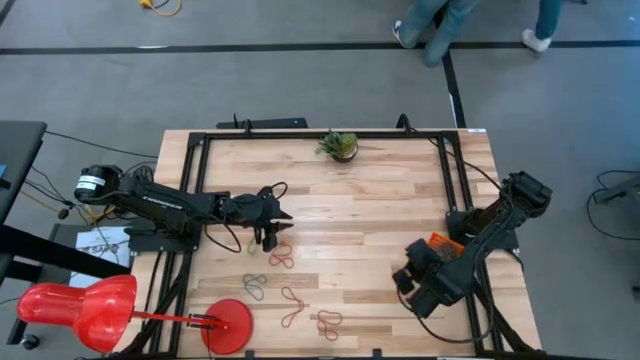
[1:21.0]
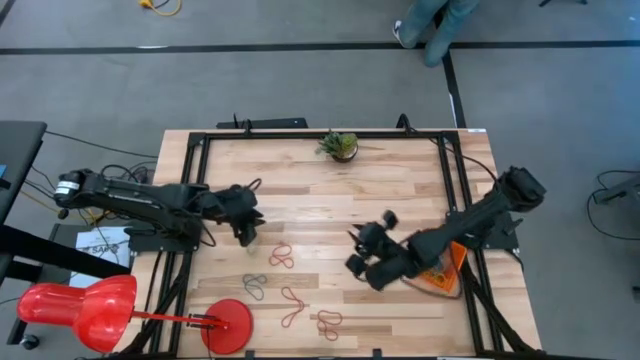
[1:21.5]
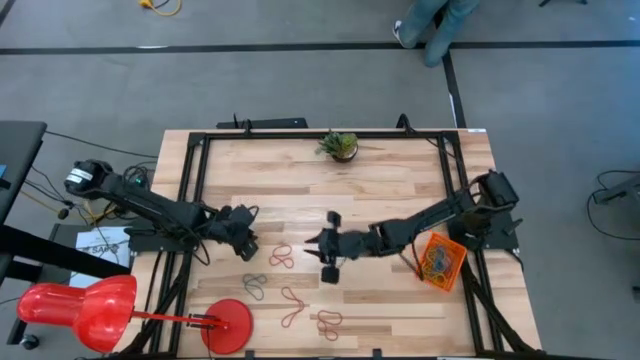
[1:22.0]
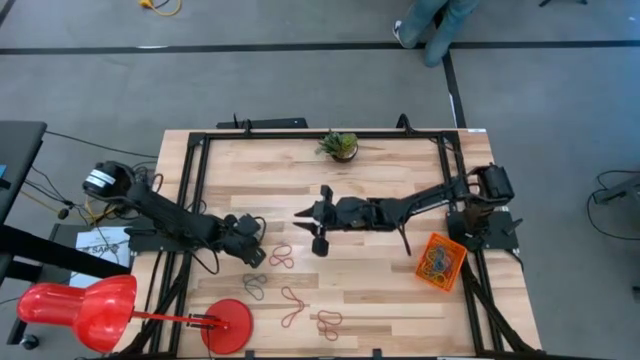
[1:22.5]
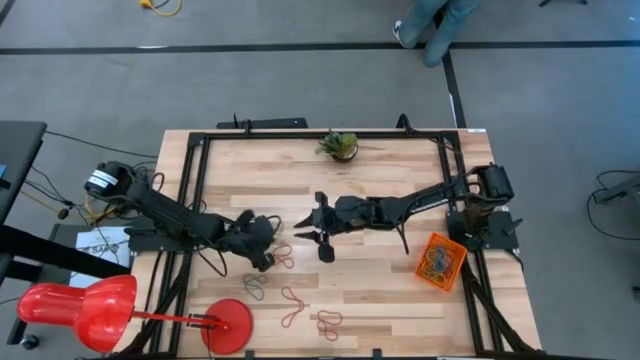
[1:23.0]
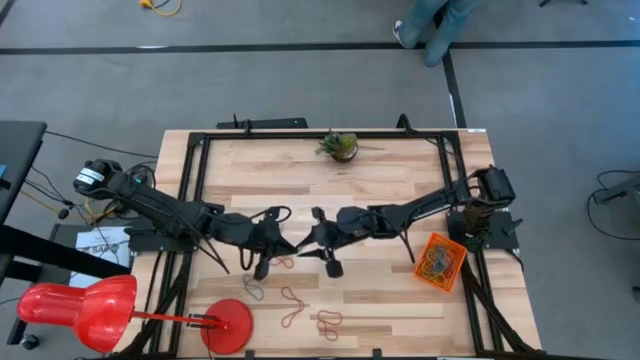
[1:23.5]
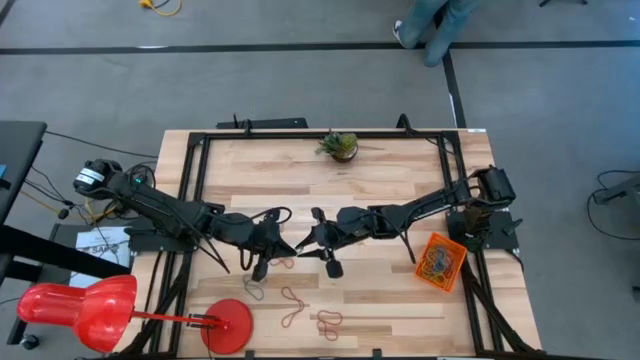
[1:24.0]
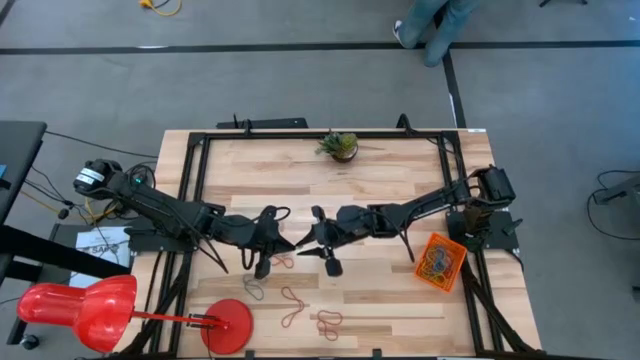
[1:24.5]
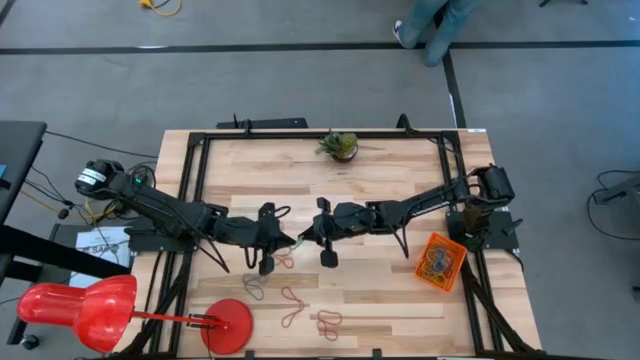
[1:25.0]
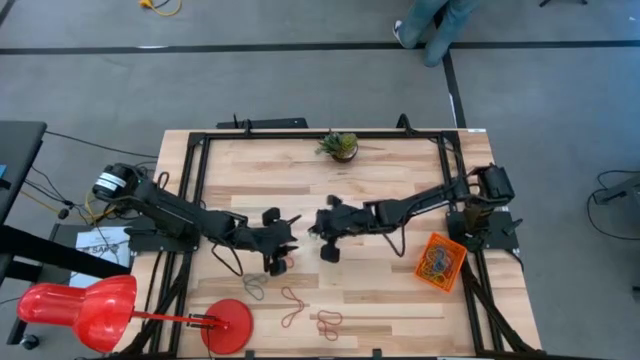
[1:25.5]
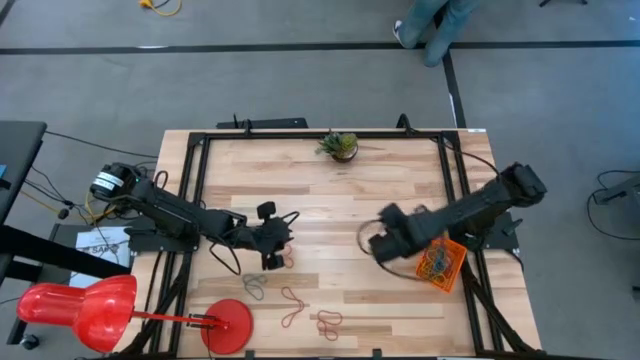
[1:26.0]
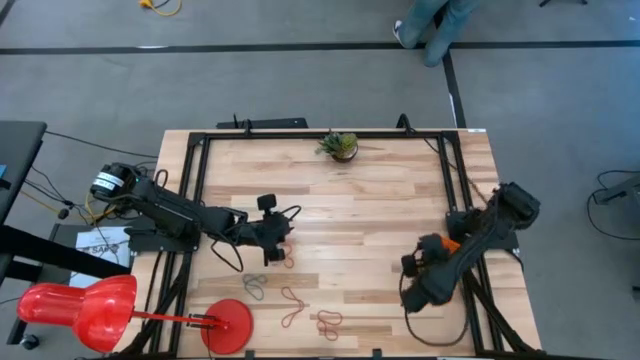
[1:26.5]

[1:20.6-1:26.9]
Task: Pick and place rubber bands into bin
Put the green rubber band into the orange basket

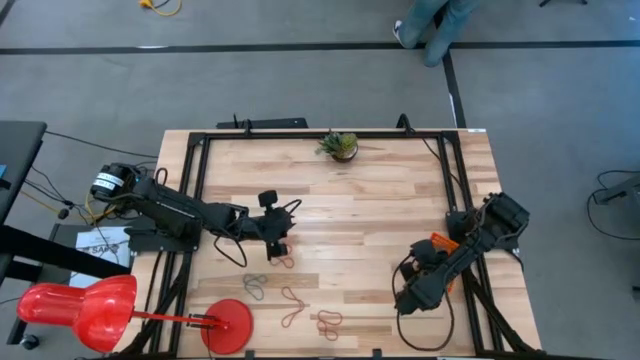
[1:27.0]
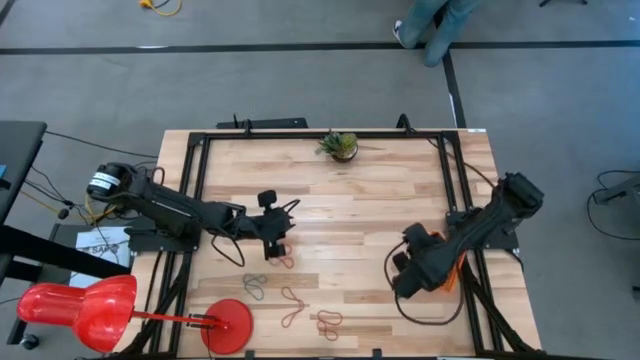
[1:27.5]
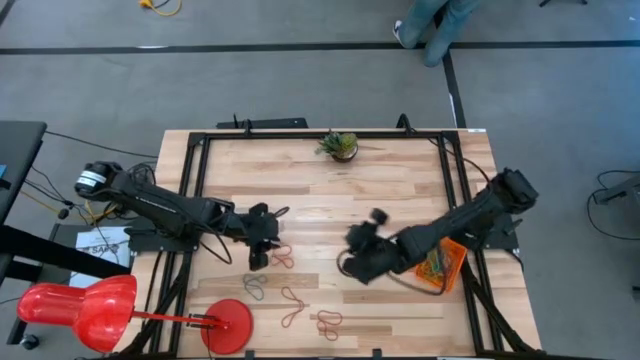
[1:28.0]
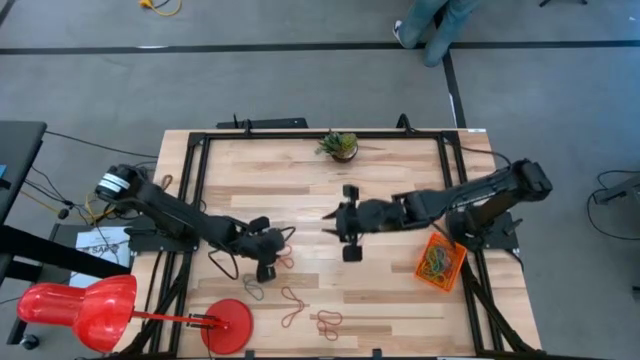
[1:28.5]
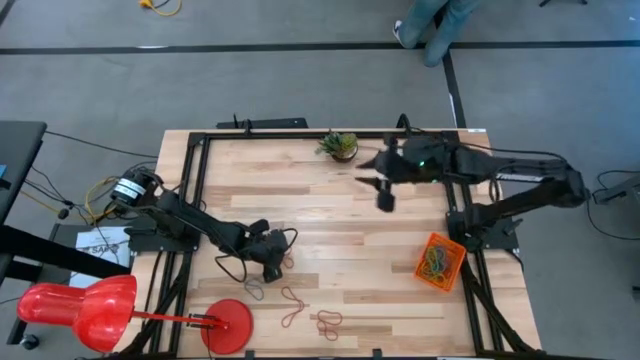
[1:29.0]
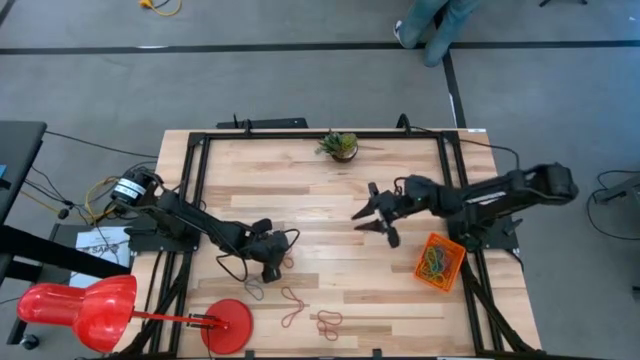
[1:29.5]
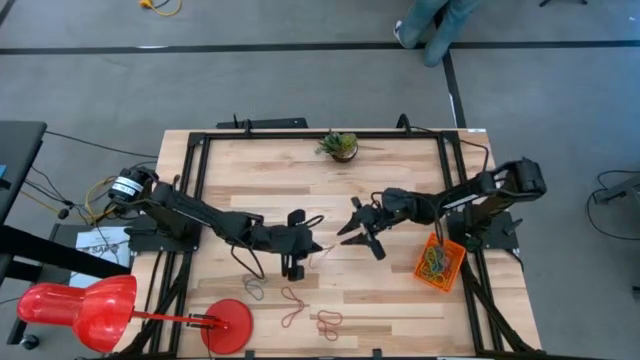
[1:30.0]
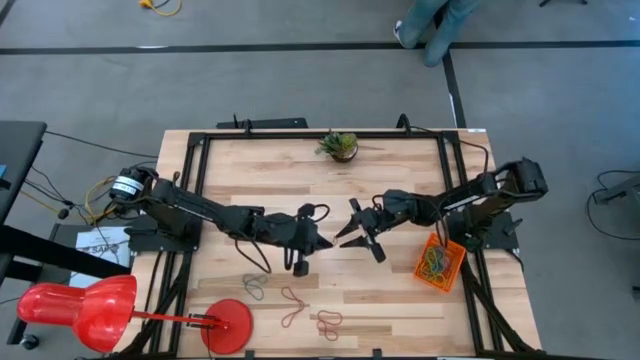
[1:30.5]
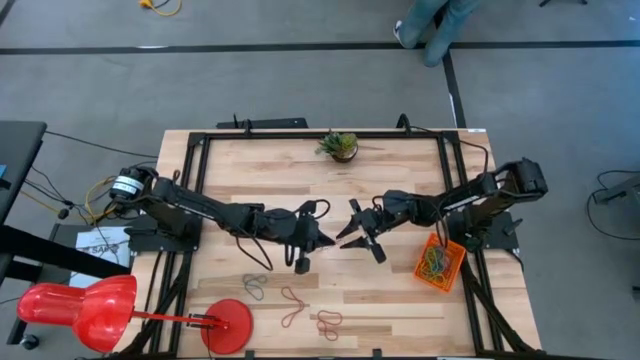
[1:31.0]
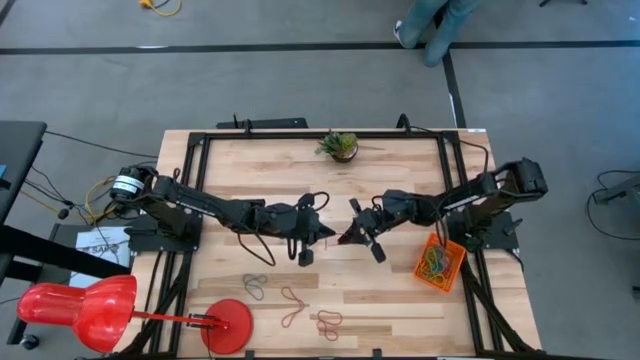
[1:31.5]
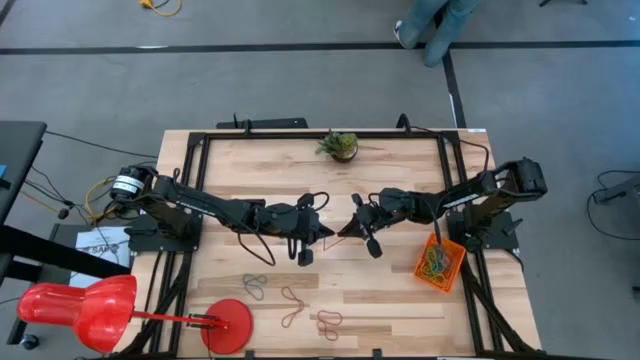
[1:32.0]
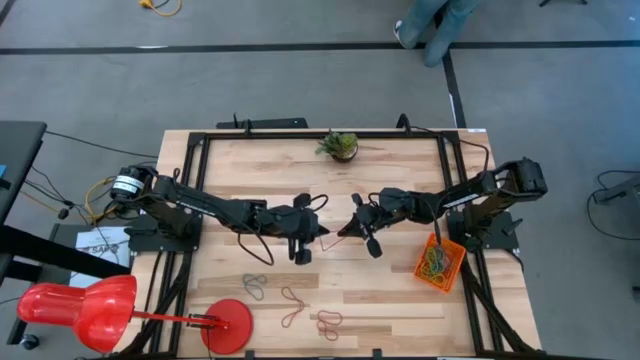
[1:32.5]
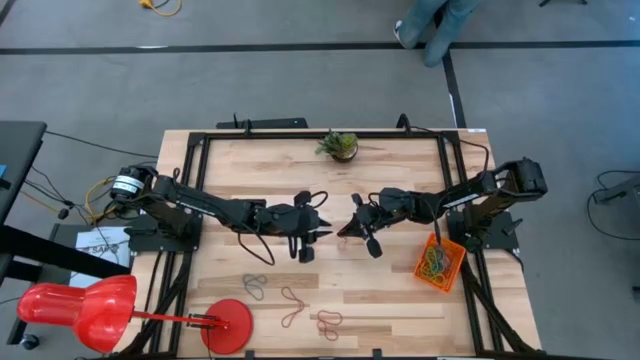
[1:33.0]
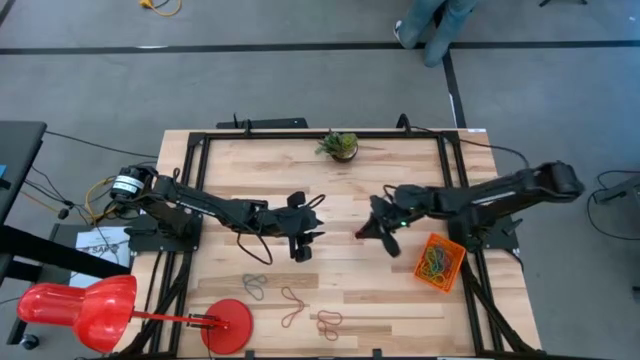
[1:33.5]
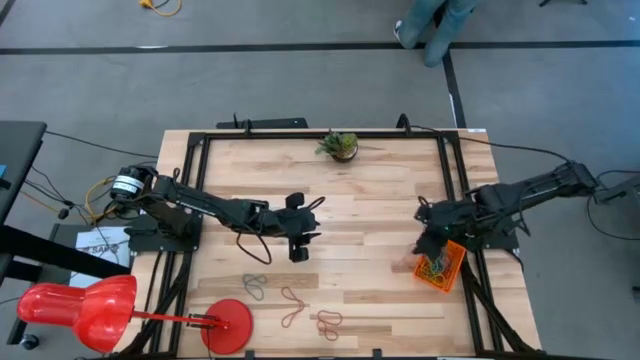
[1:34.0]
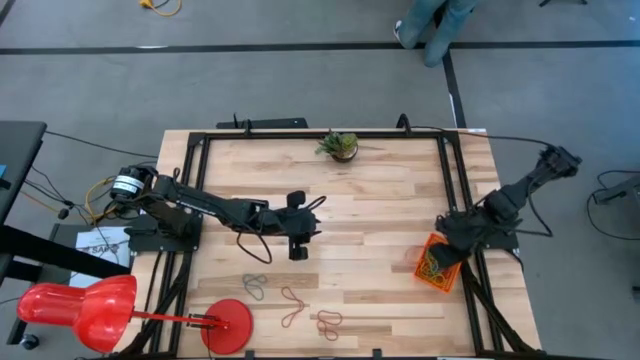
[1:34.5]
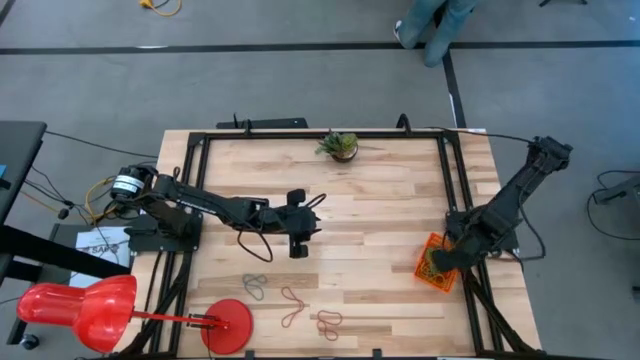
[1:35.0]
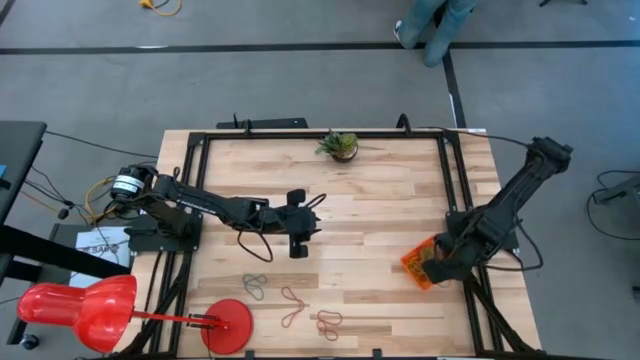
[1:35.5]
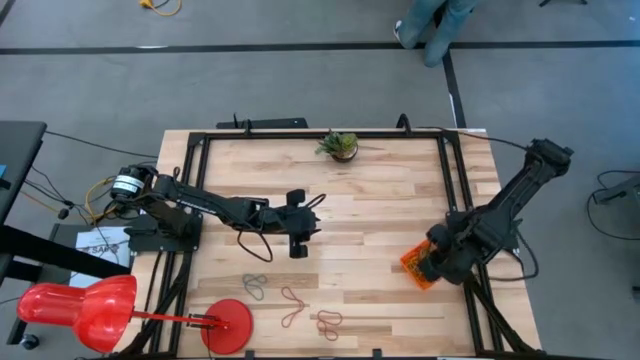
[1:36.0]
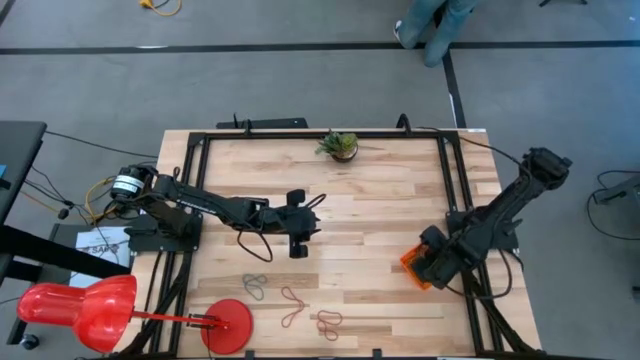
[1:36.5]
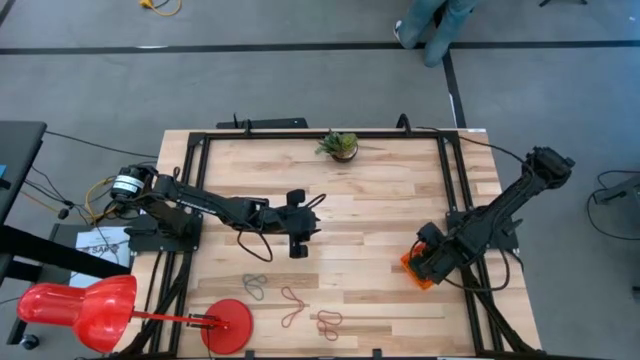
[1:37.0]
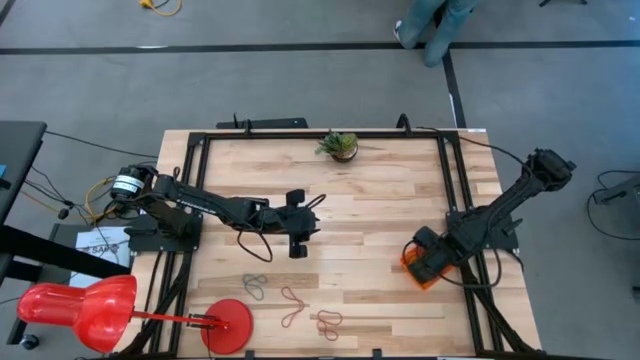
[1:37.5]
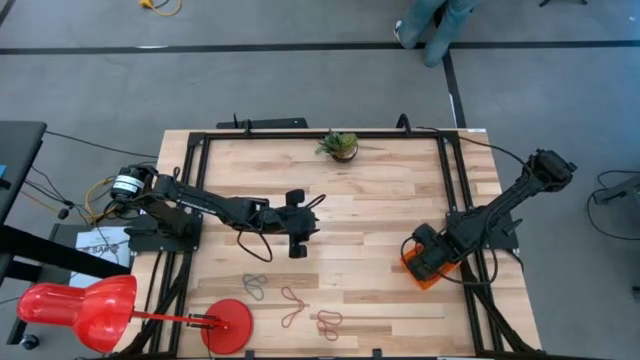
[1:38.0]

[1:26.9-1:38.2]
Put the red rubber band into the orange basket

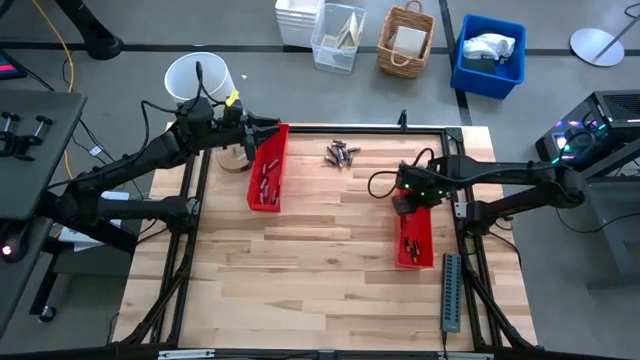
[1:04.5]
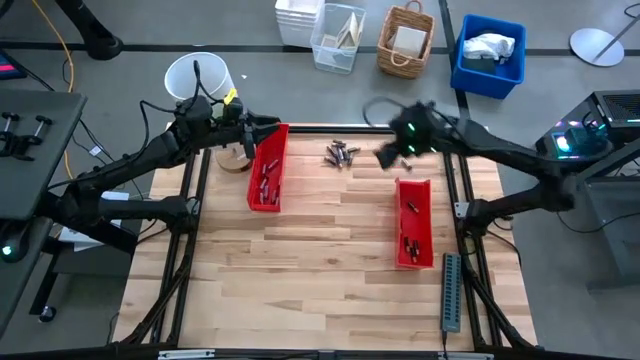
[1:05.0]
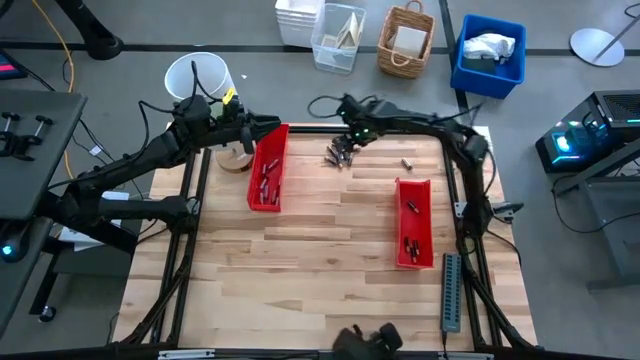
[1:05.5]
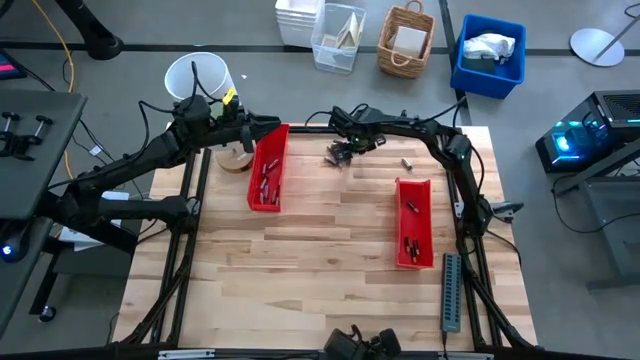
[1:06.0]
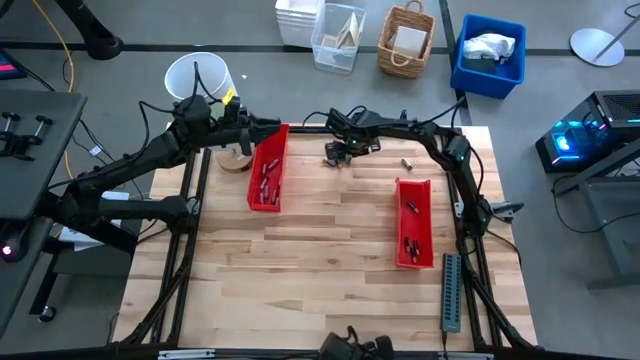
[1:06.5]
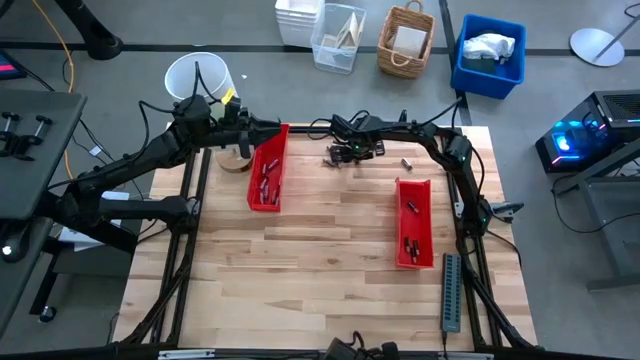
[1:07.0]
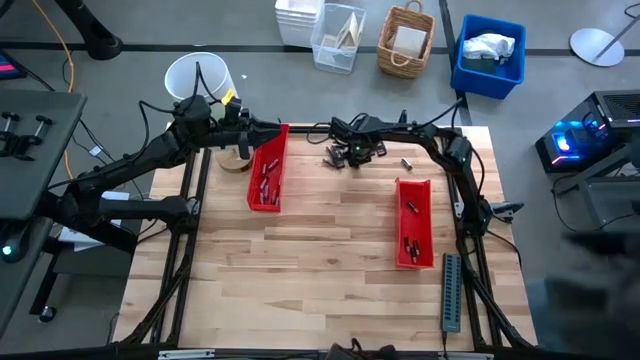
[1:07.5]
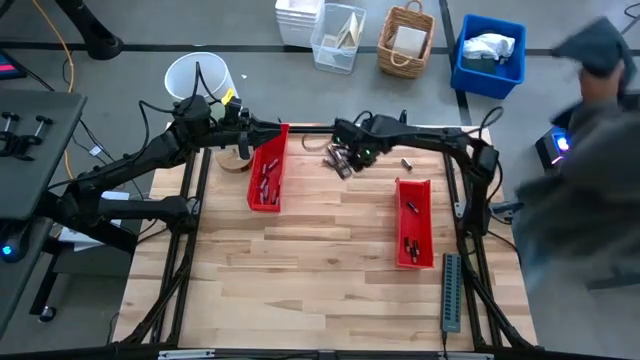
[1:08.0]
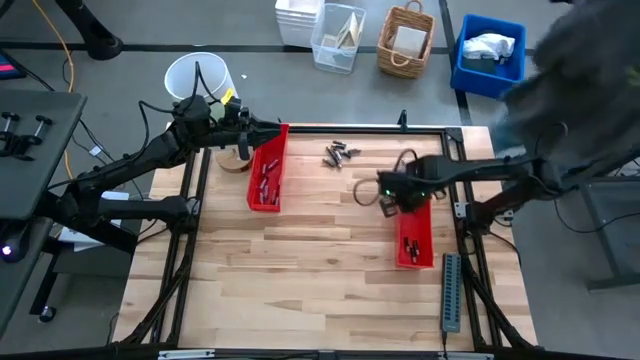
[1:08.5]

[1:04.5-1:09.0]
Task: Sort batteries
Put the black battery into the bottom red bin
